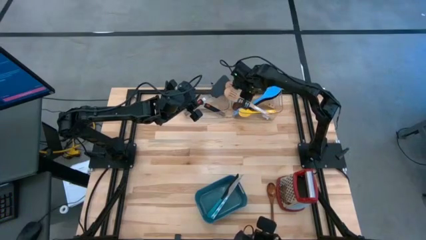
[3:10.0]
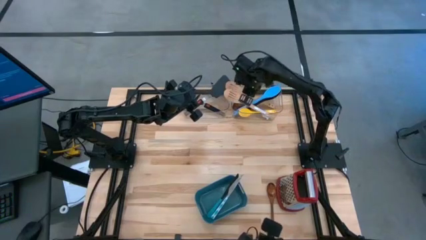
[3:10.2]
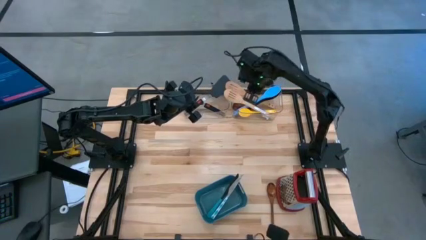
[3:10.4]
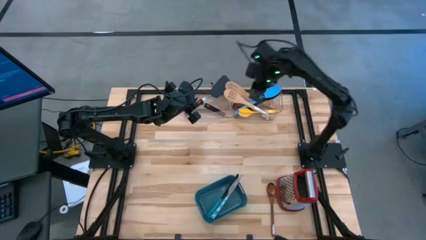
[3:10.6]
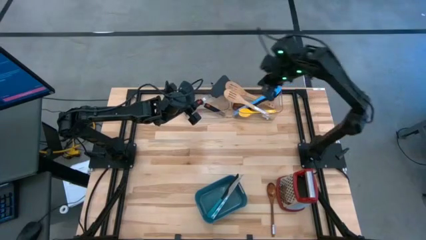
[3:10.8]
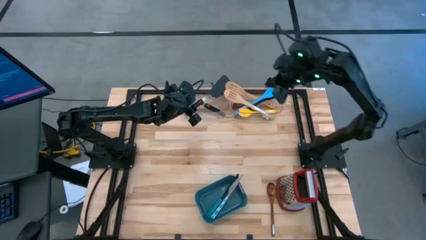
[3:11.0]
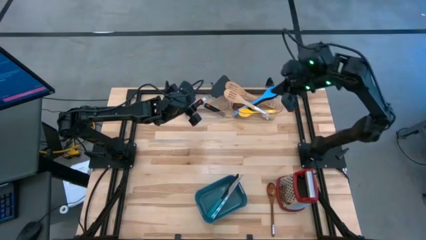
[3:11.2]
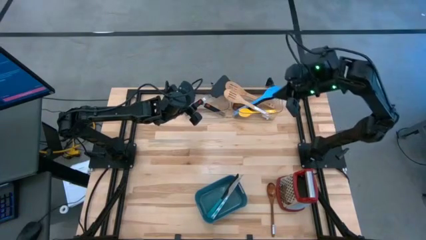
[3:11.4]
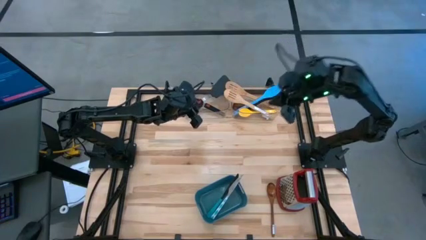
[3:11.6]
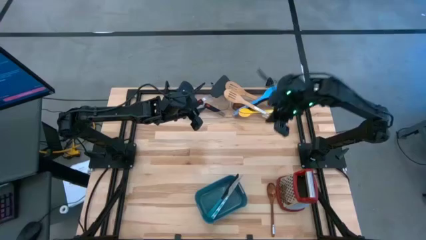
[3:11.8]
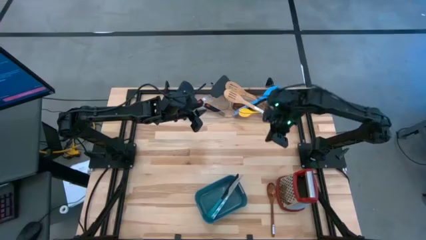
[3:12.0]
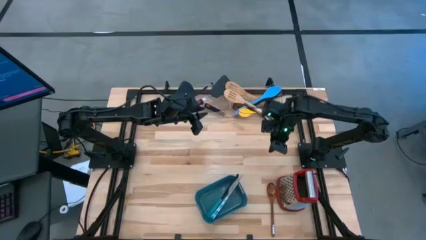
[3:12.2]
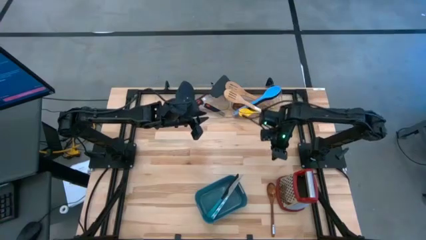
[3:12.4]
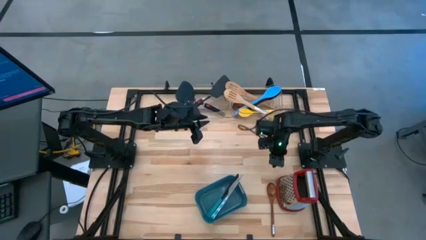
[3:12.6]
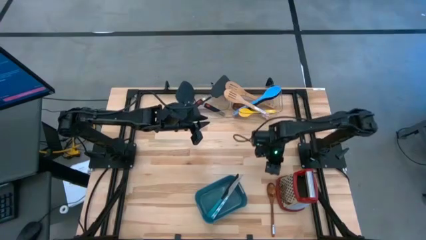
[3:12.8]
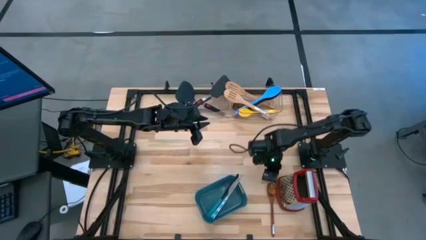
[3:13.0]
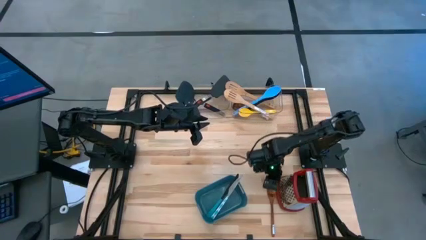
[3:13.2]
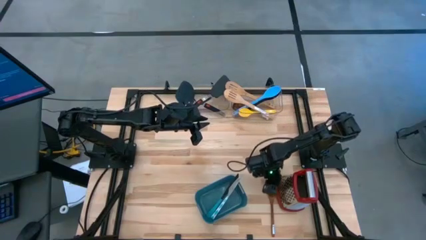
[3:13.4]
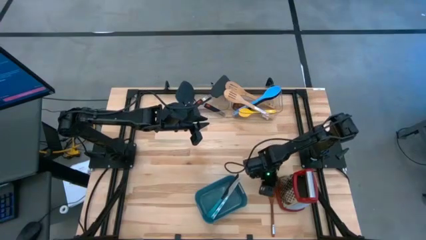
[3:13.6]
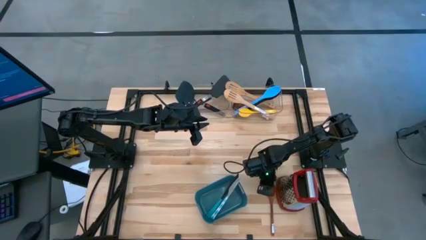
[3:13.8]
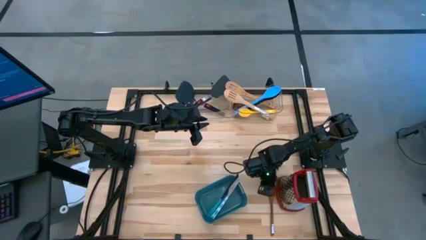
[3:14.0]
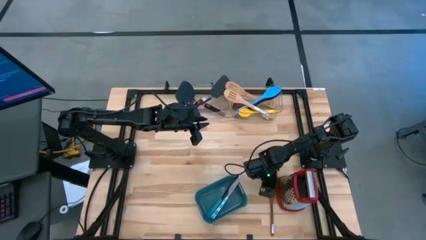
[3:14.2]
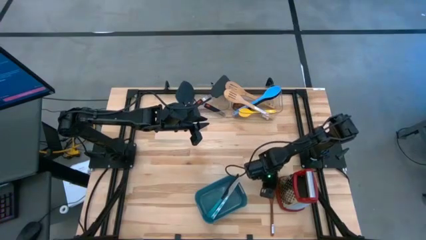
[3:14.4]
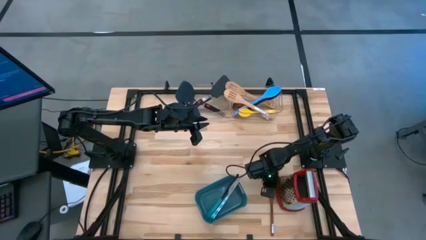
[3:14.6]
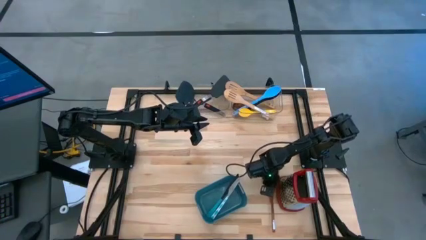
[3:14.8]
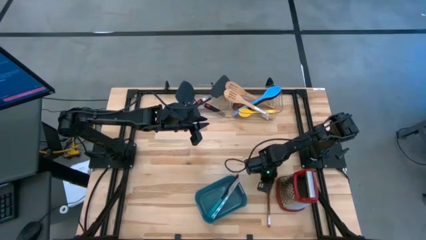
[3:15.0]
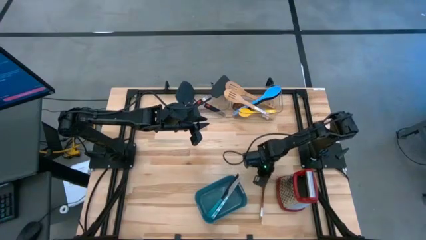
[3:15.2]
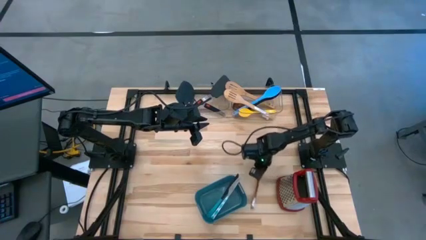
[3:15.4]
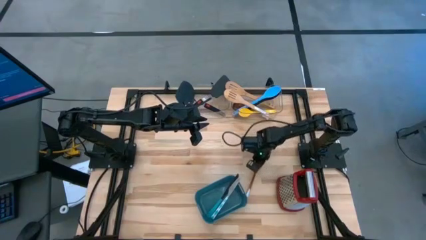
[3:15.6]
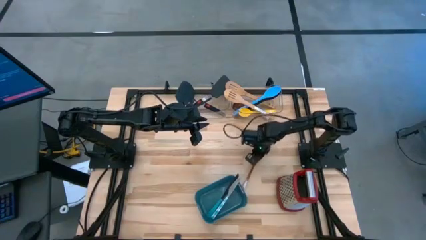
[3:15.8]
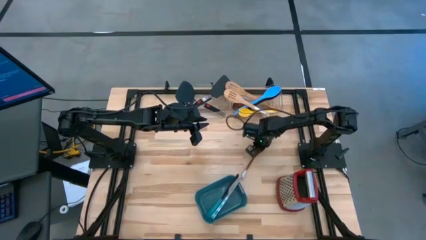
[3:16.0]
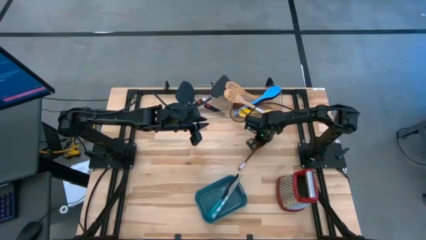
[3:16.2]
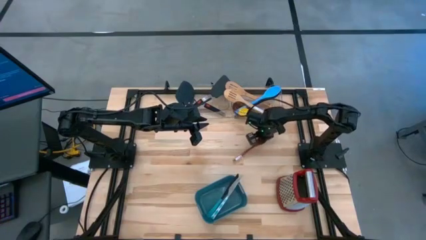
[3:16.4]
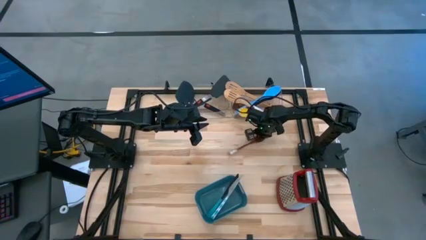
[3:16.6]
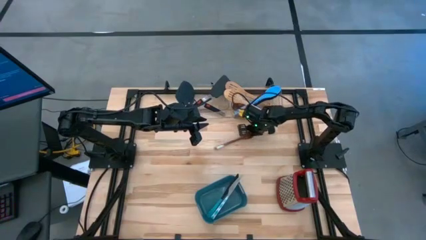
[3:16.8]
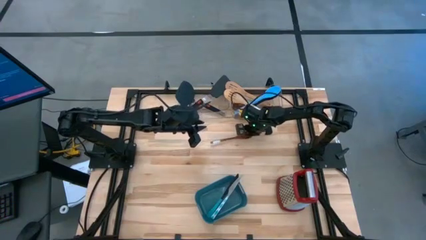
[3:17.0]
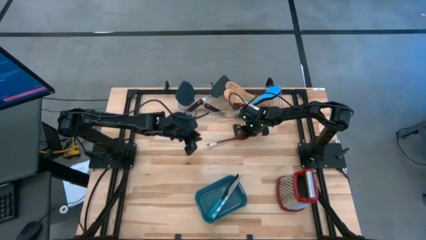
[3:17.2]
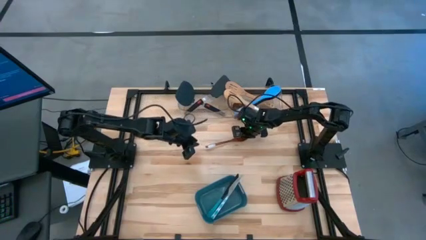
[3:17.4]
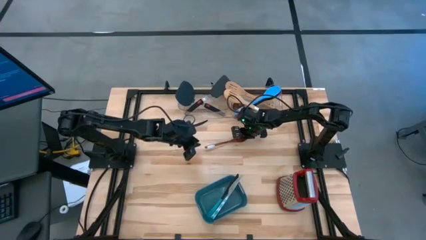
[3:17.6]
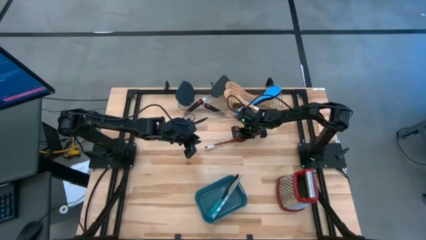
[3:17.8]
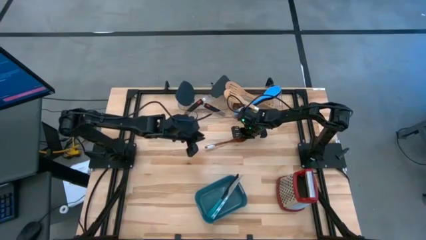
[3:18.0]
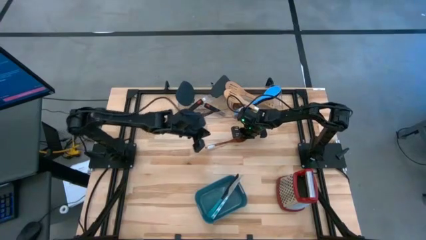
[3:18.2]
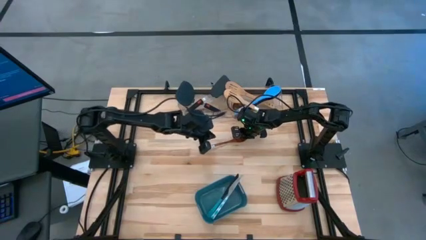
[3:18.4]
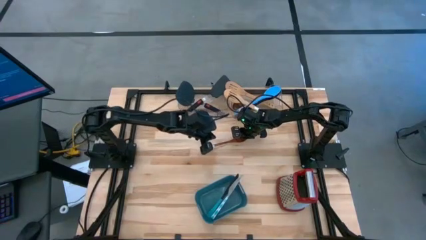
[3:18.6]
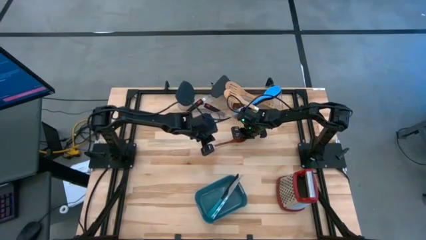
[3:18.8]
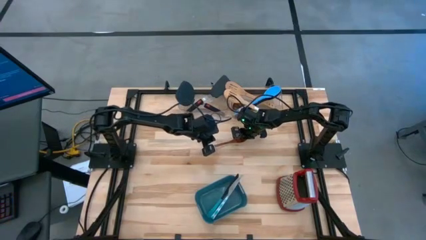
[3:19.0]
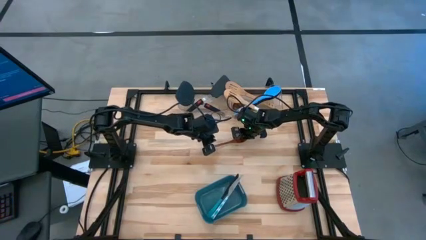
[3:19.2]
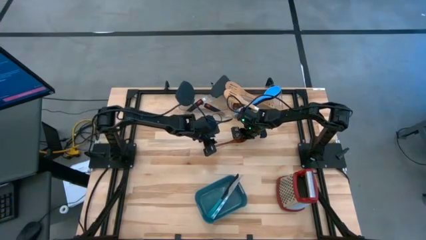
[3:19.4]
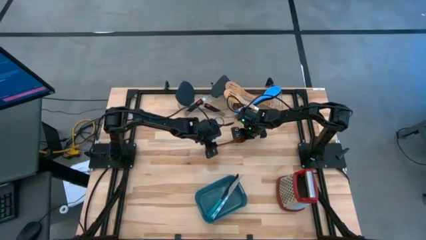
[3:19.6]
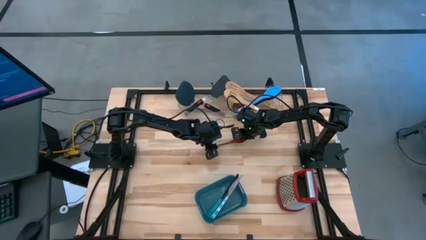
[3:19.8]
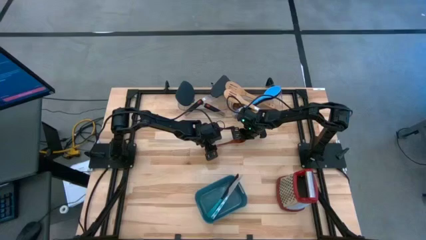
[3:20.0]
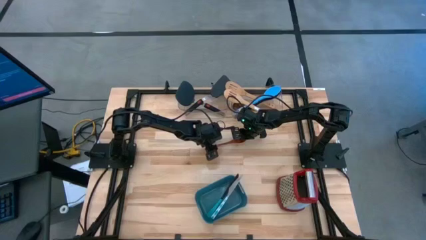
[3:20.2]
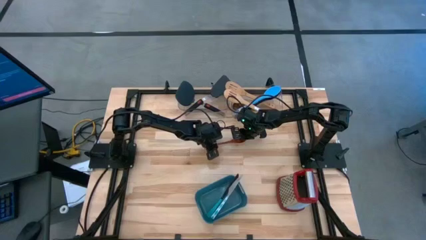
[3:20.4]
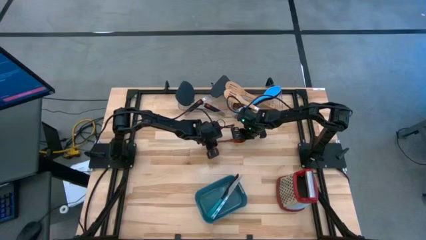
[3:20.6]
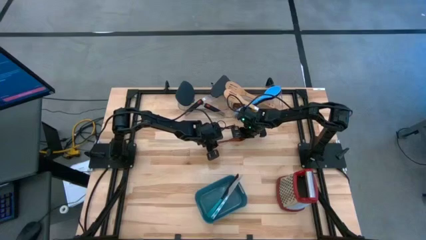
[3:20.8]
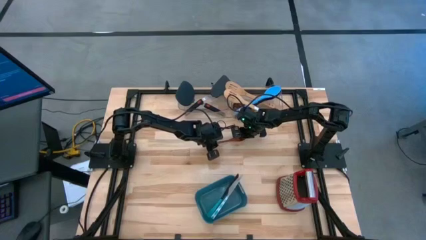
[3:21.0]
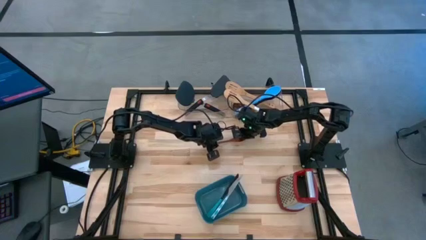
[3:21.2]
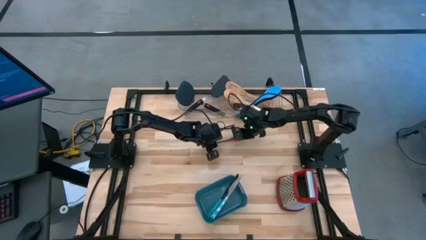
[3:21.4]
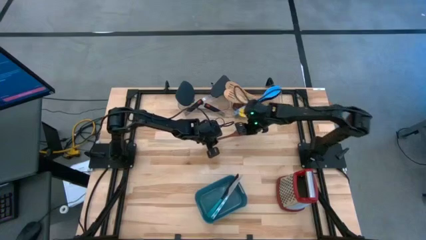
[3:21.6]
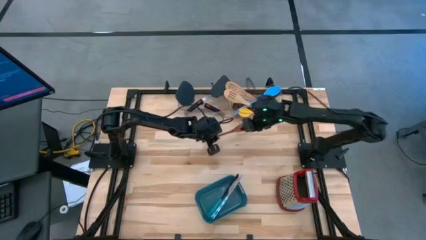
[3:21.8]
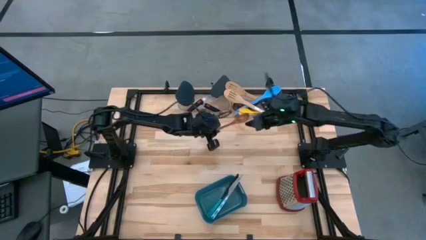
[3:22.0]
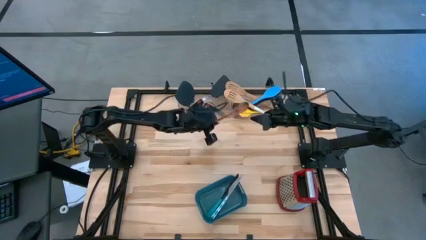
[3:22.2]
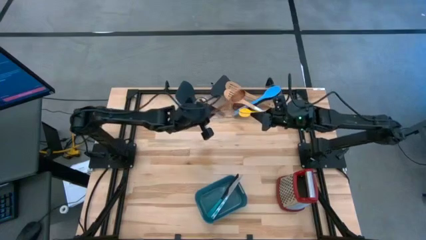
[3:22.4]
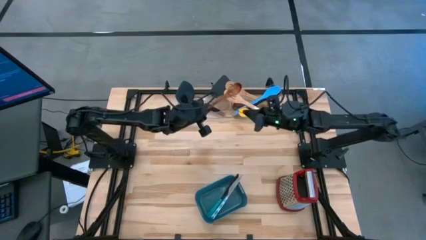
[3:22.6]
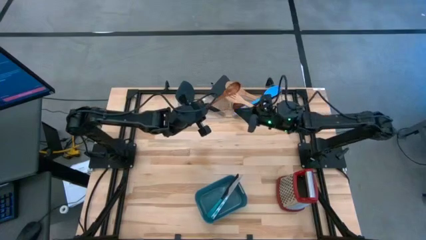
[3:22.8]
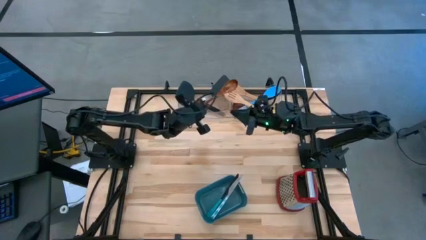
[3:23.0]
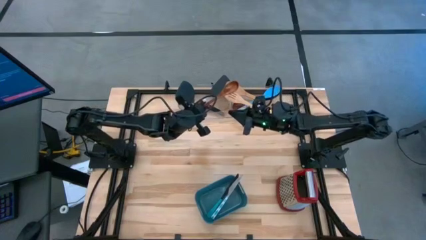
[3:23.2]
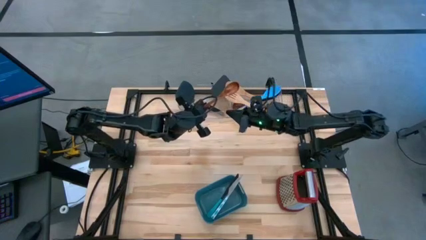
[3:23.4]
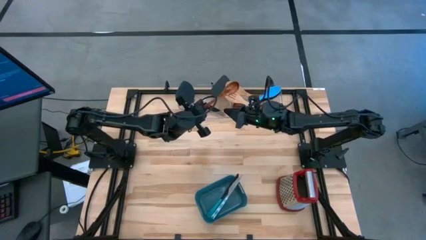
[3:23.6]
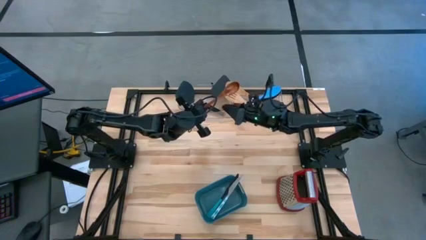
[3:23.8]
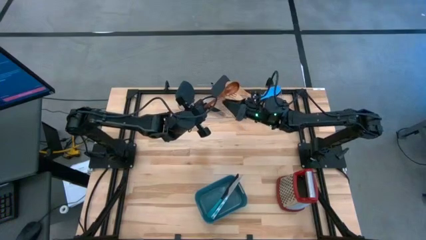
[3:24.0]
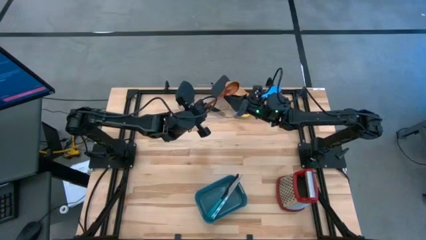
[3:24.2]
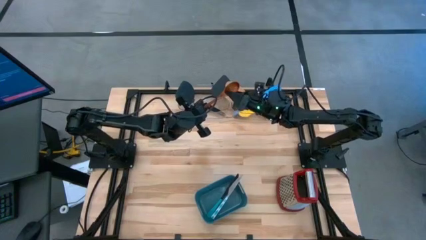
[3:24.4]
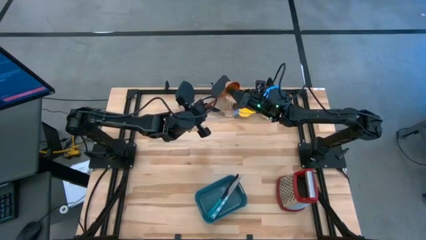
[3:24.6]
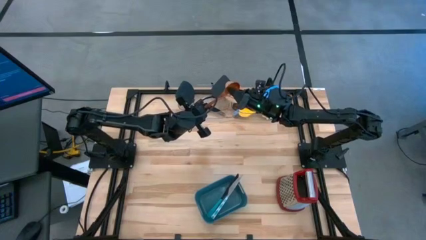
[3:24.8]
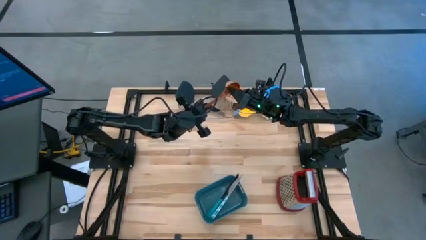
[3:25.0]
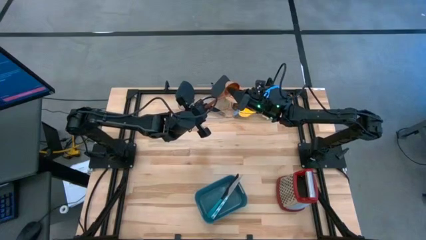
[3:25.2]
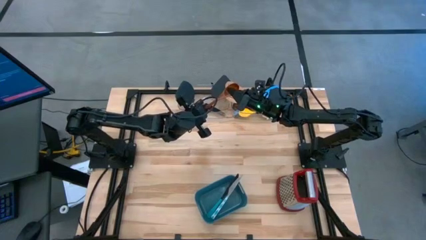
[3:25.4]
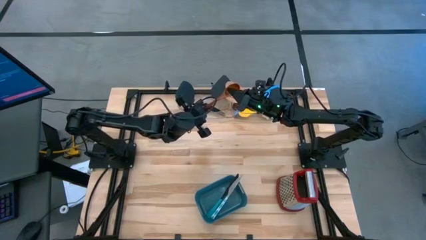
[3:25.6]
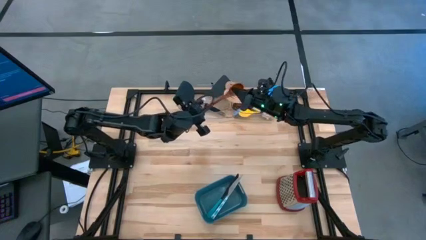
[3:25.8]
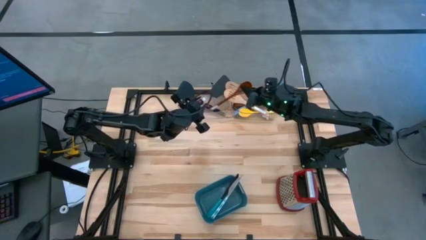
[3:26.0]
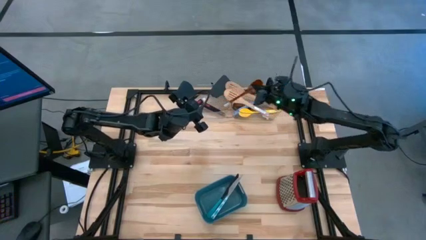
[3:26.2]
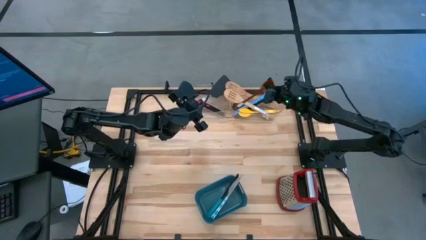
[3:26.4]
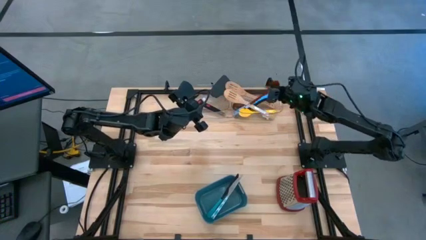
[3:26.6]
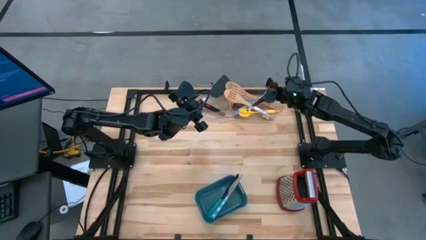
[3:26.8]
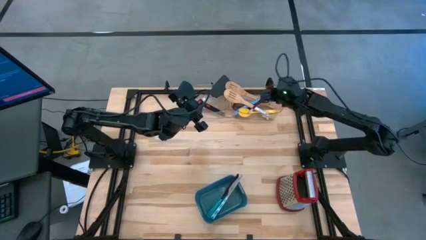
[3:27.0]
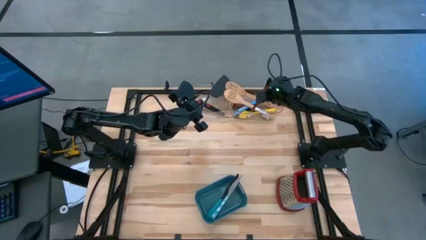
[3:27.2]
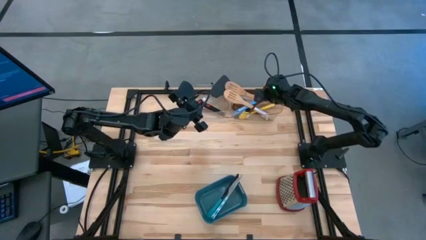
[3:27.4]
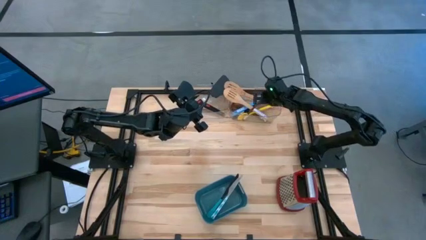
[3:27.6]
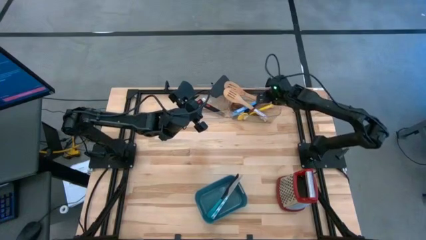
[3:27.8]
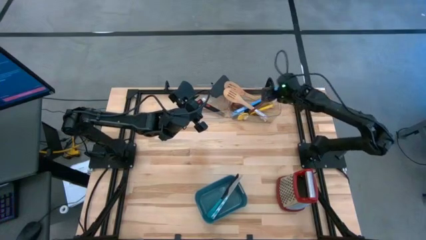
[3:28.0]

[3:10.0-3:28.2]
Task: Pick & Place Kitchen Items
Put the wooden serving spoon into the top right transparent bin
